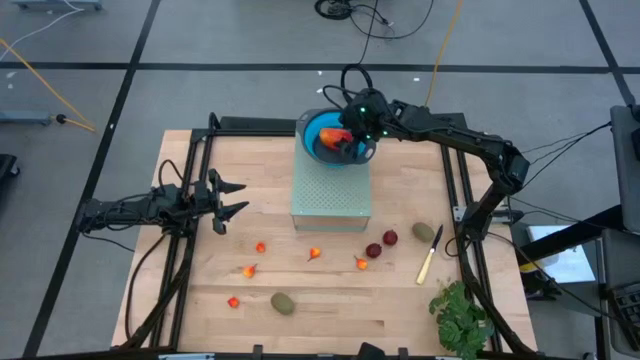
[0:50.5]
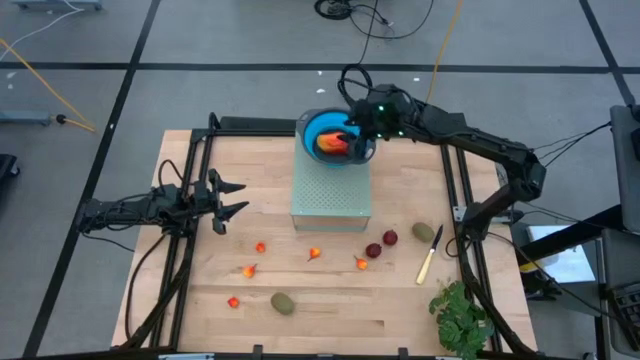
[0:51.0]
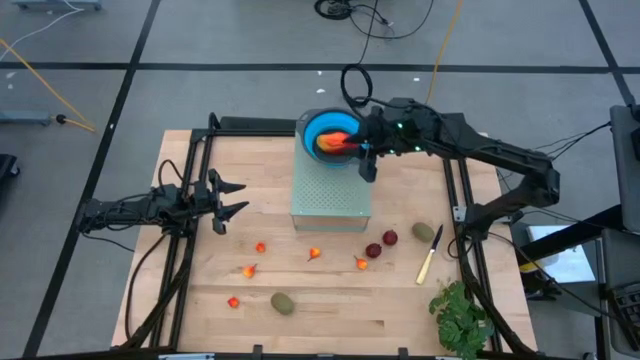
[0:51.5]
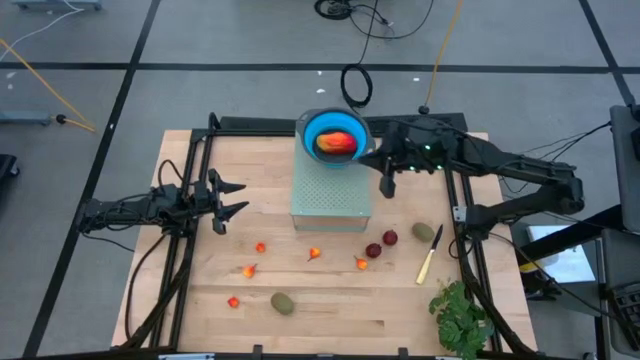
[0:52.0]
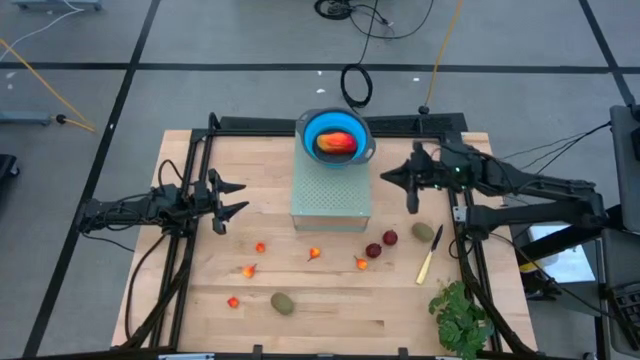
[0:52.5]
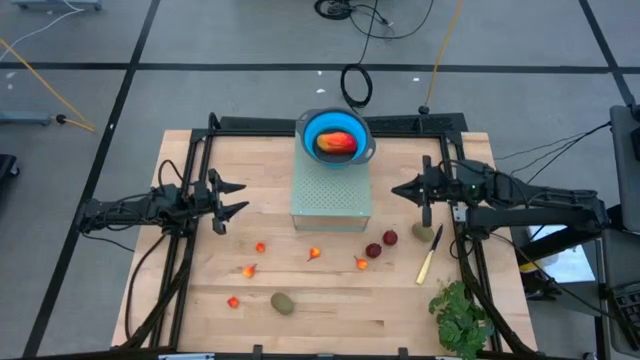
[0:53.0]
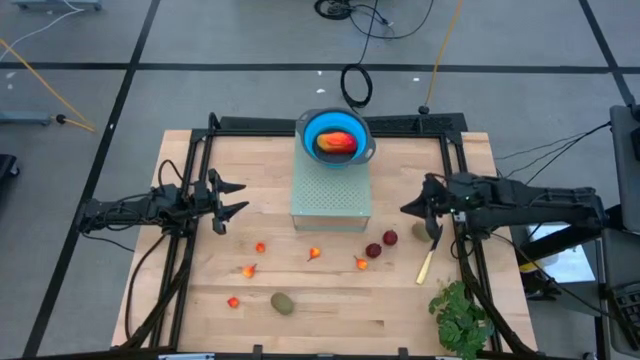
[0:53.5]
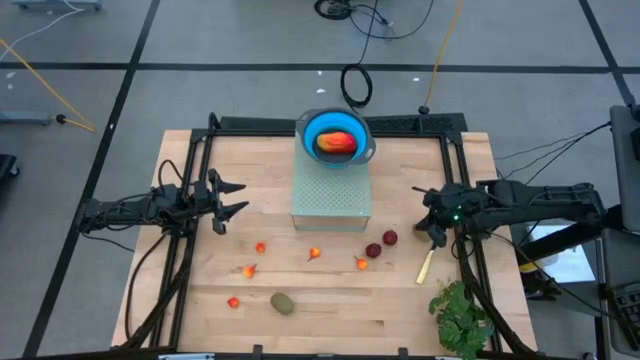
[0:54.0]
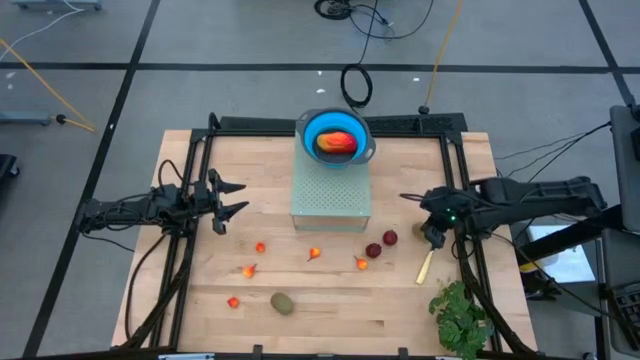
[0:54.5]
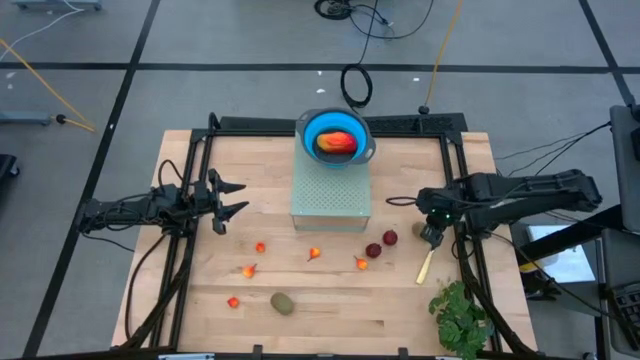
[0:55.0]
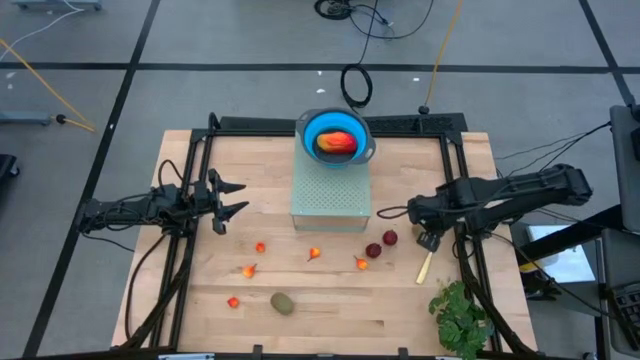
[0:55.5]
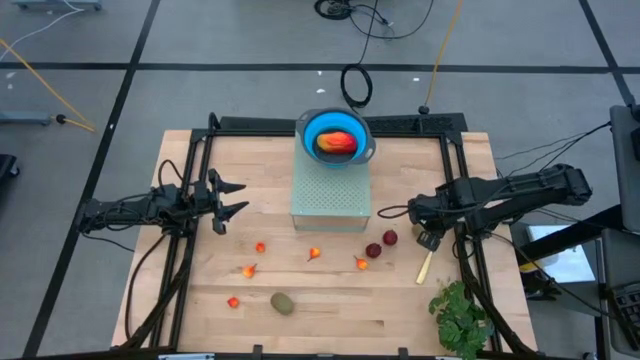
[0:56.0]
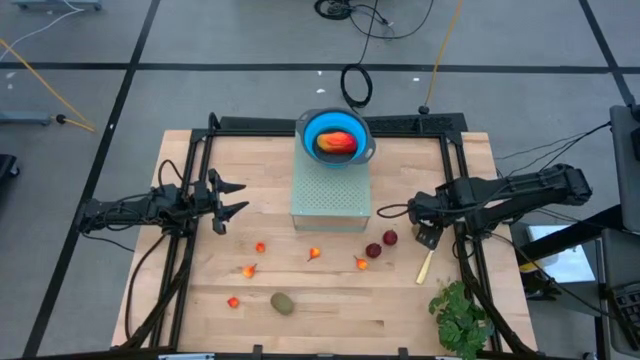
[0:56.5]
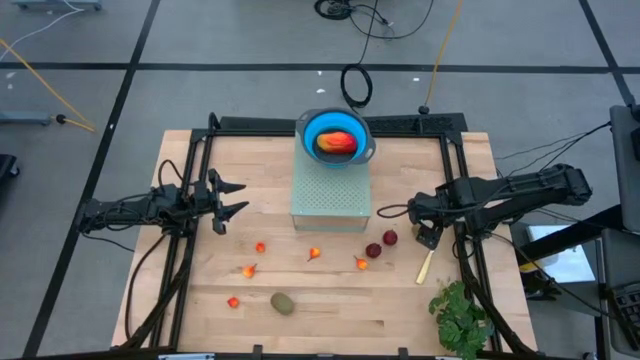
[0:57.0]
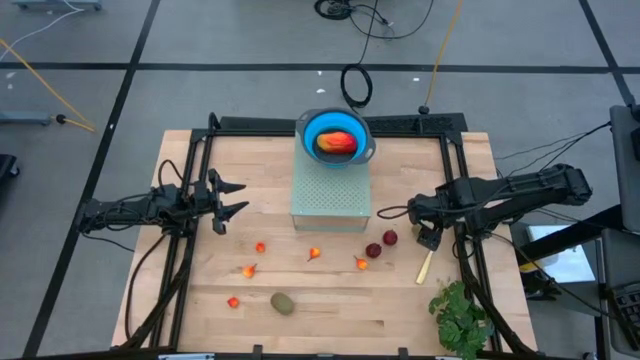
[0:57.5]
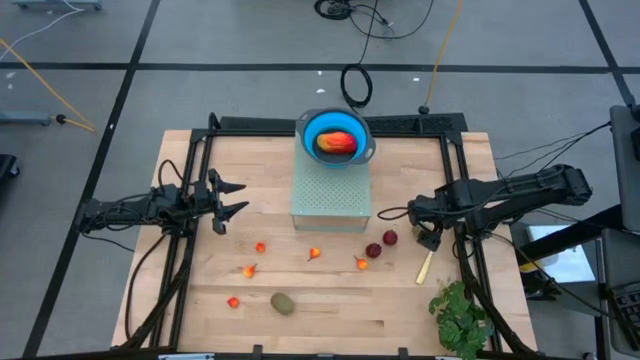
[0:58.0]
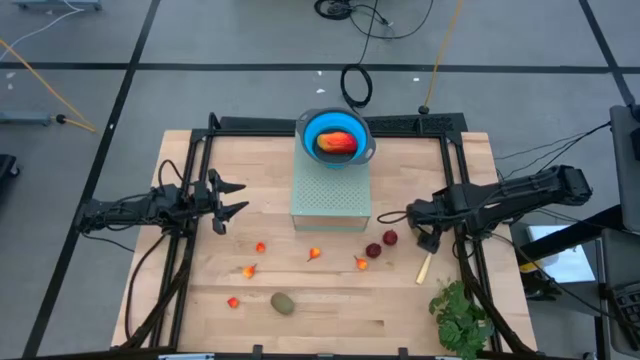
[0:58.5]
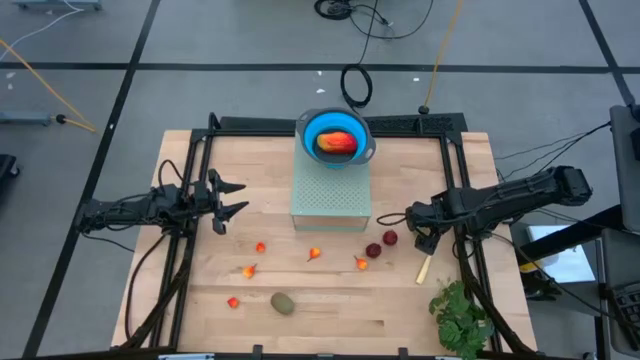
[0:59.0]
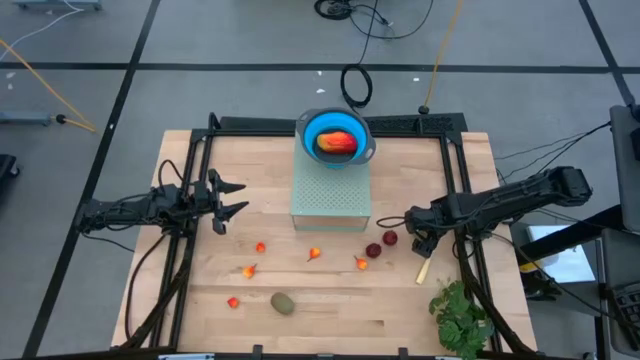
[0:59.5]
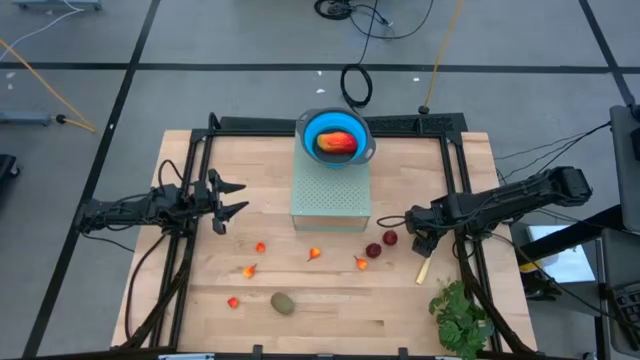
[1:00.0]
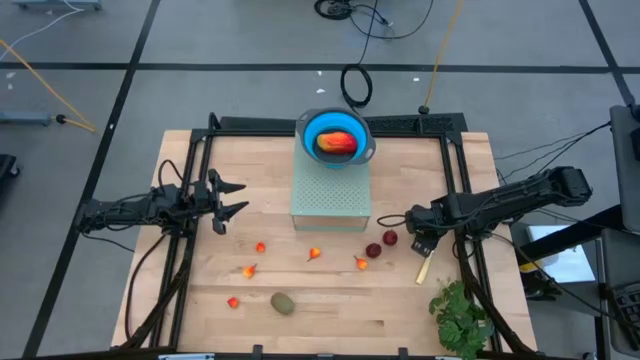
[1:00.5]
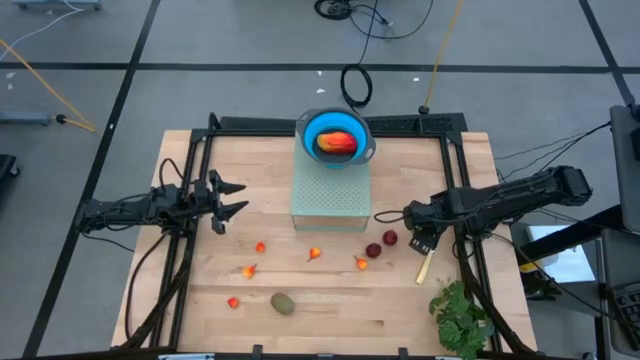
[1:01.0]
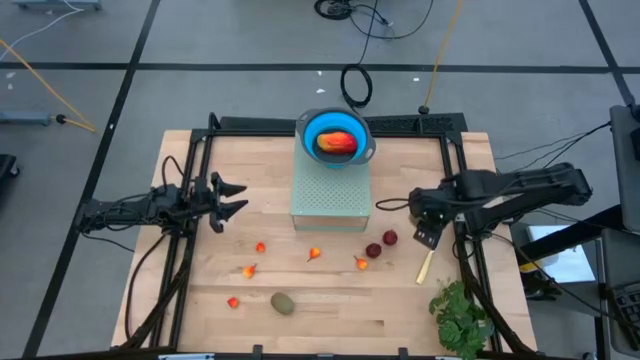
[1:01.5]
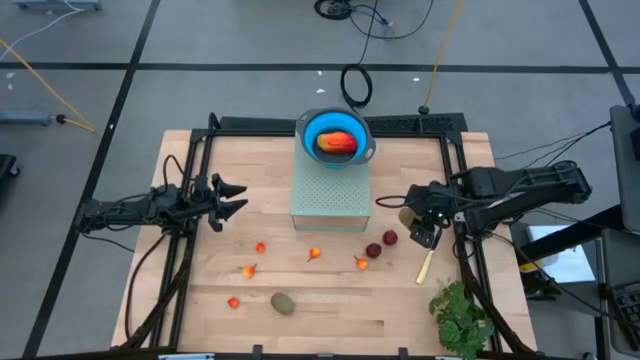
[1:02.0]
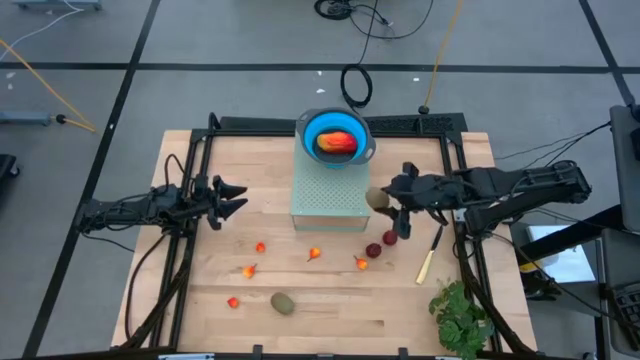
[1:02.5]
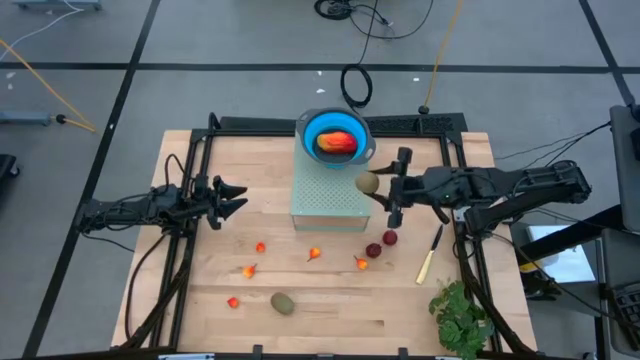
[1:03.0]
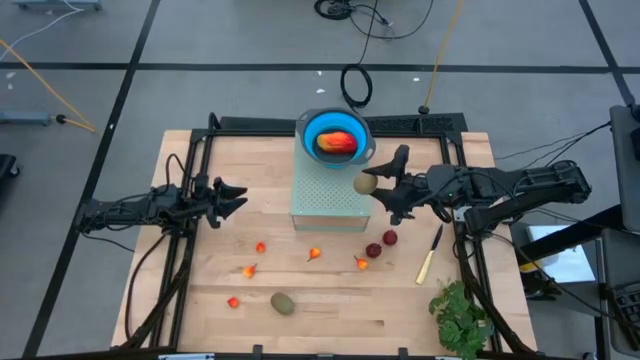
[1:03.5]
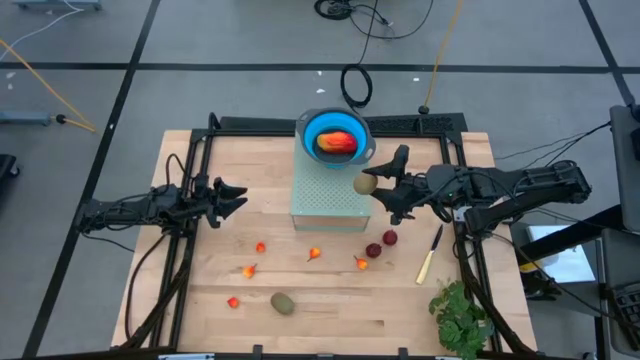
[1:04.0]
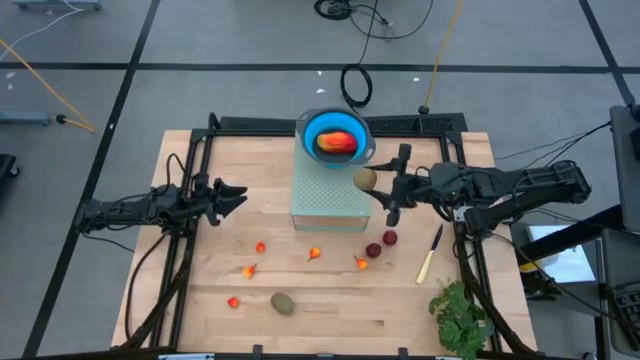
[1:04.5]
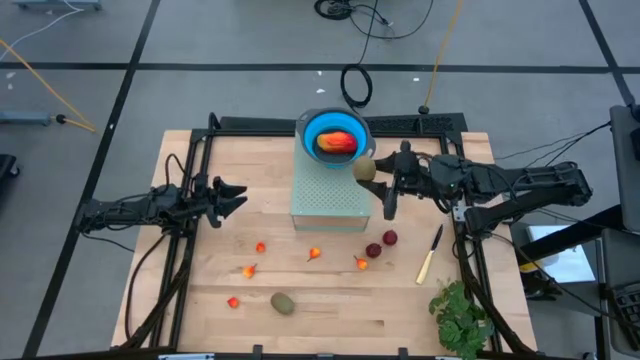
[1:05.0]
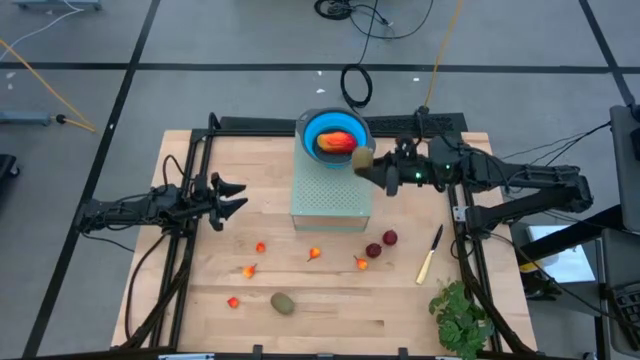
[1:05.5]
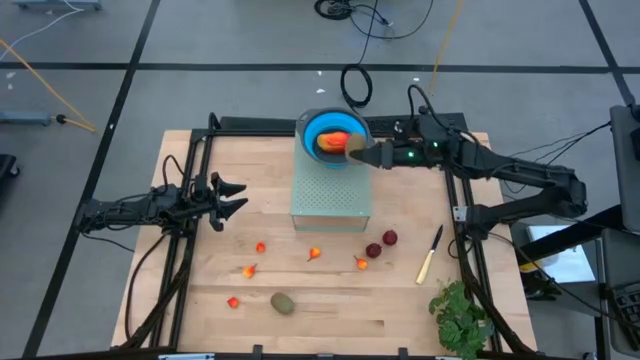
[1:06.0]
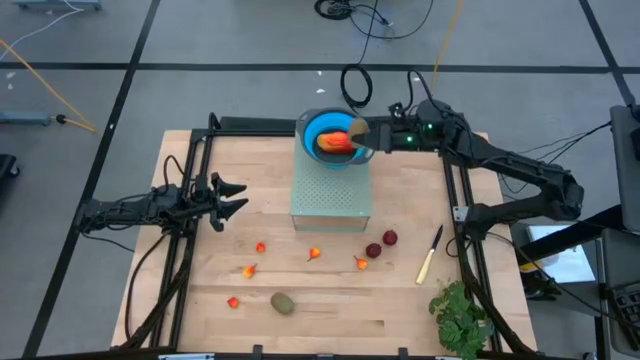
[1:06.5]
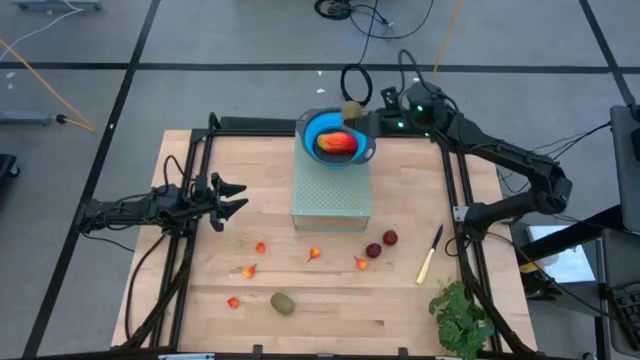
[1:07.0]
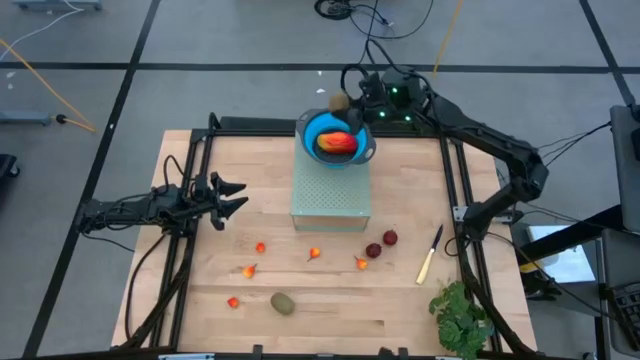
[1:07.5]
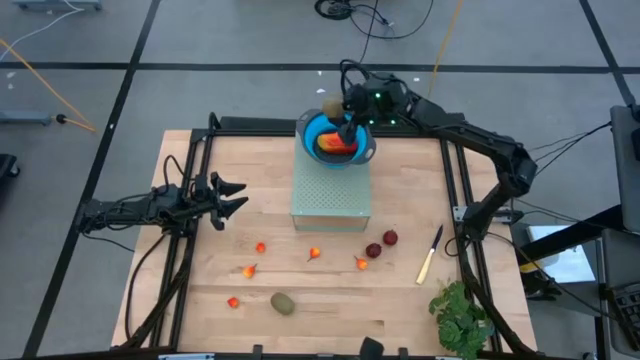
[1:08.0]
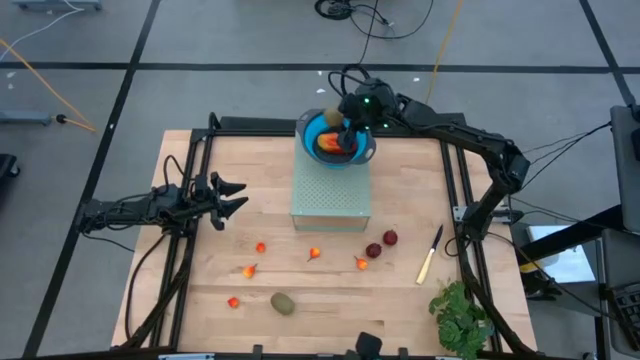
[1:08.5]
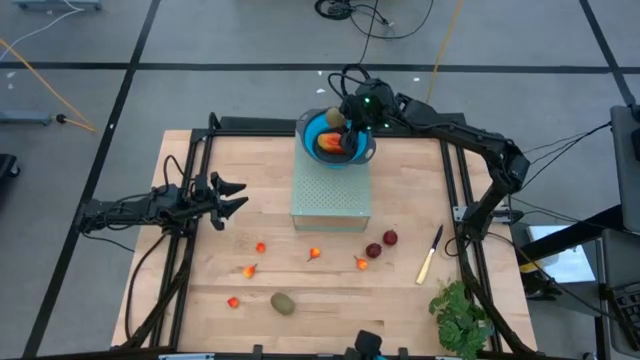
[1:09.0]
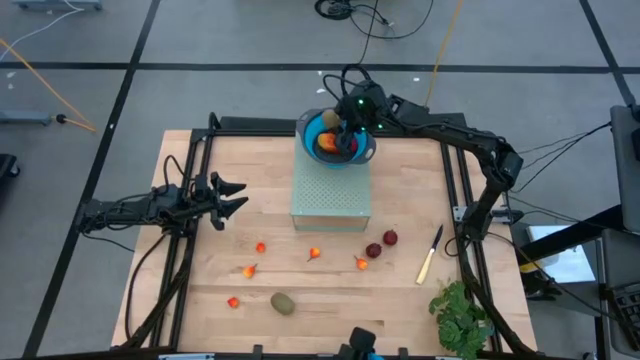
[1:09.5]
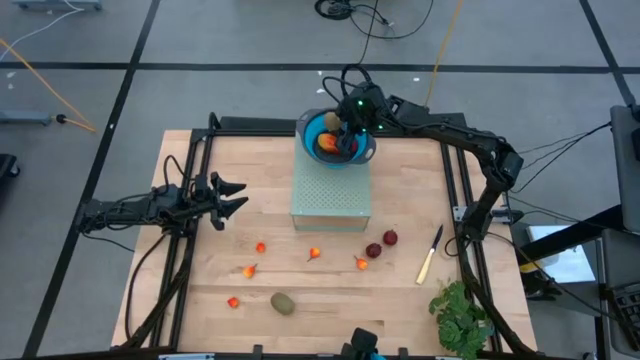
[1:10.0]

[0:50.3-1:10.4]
Task: Pick & Place Fruit
Put the kiwi into the blue strainer bowl on the shelf
